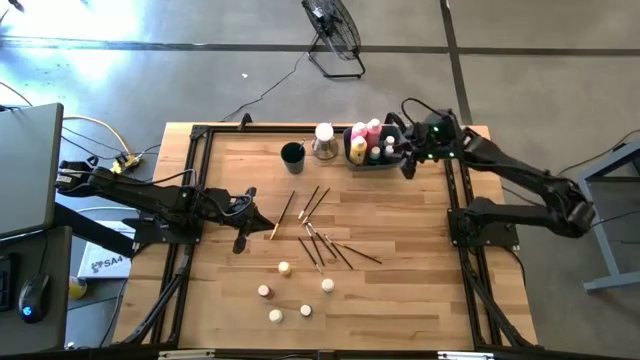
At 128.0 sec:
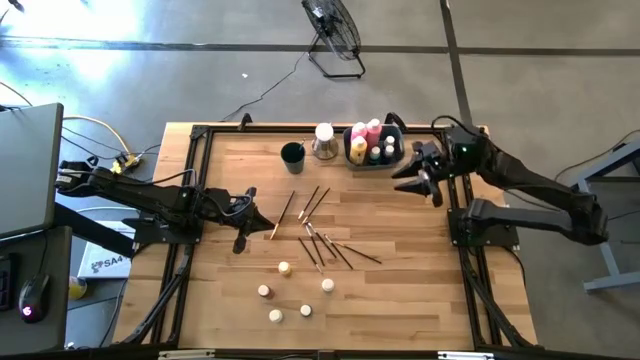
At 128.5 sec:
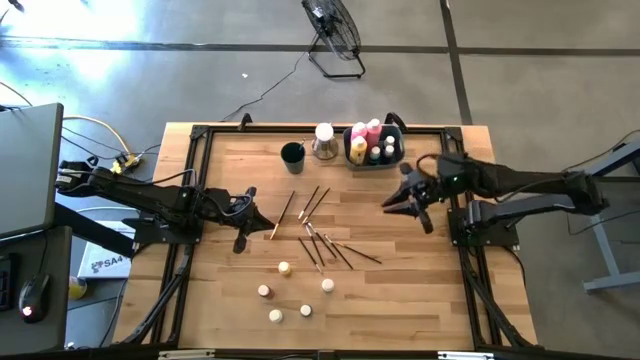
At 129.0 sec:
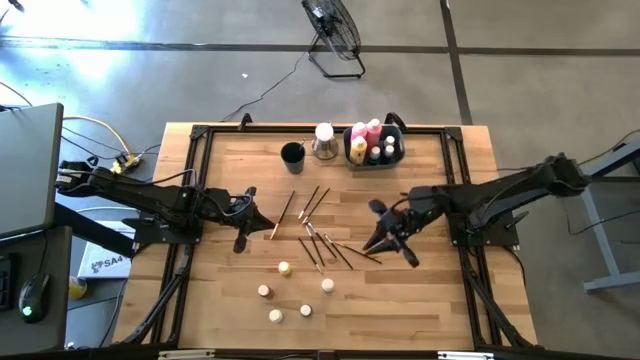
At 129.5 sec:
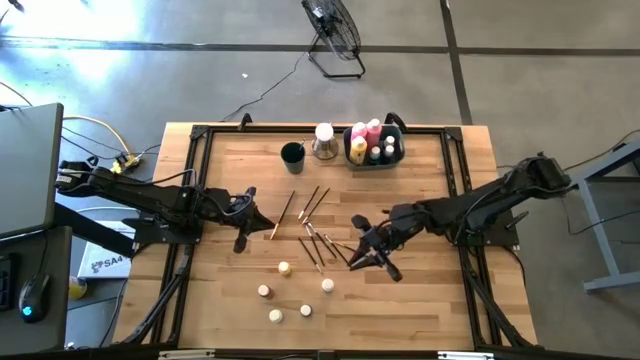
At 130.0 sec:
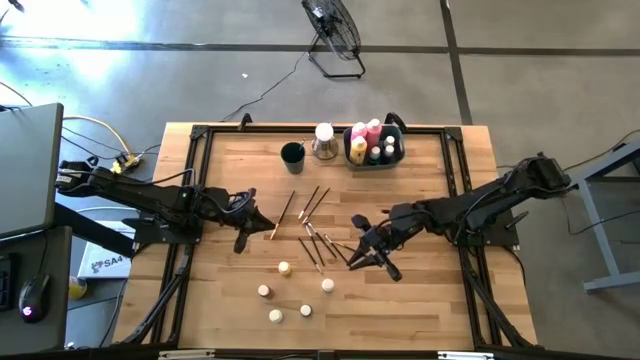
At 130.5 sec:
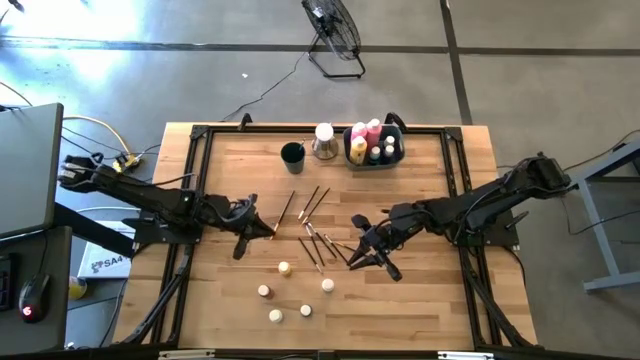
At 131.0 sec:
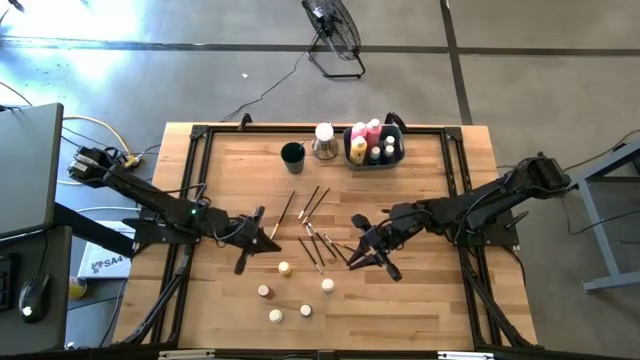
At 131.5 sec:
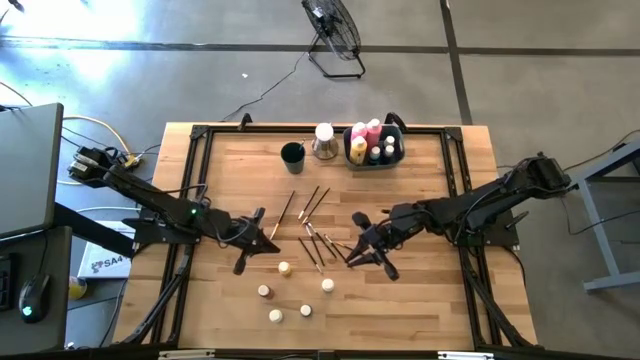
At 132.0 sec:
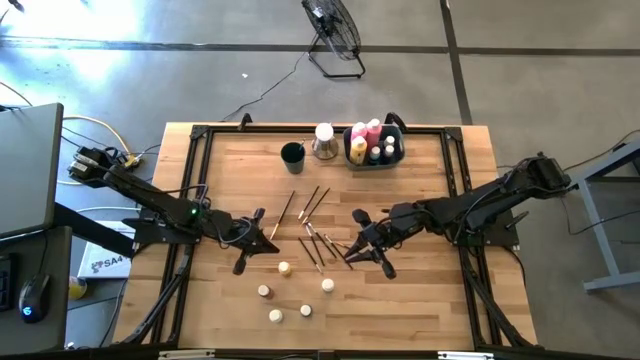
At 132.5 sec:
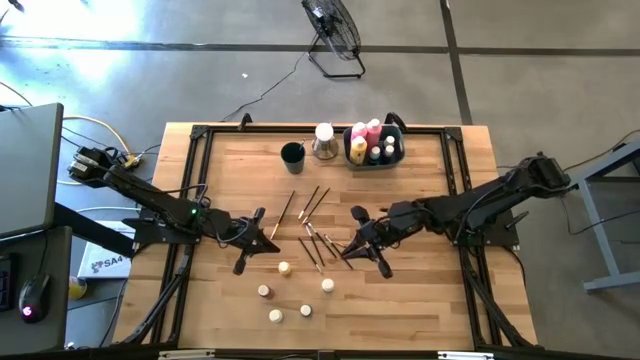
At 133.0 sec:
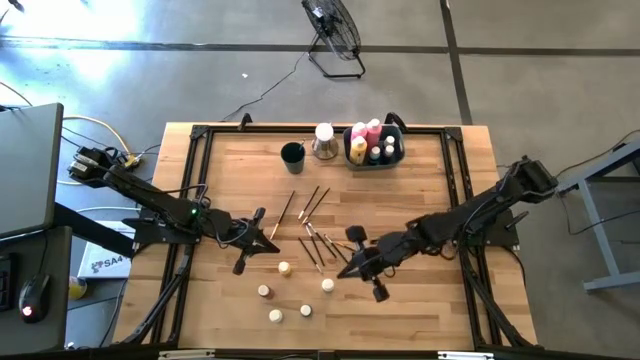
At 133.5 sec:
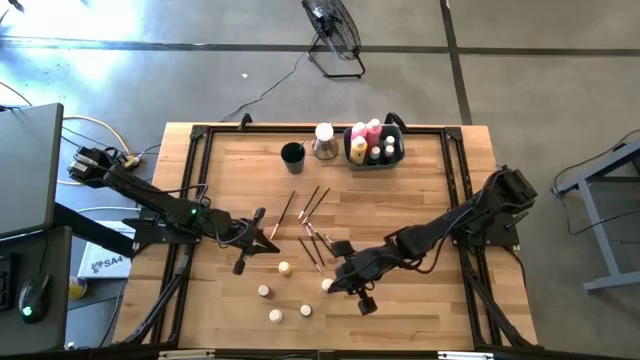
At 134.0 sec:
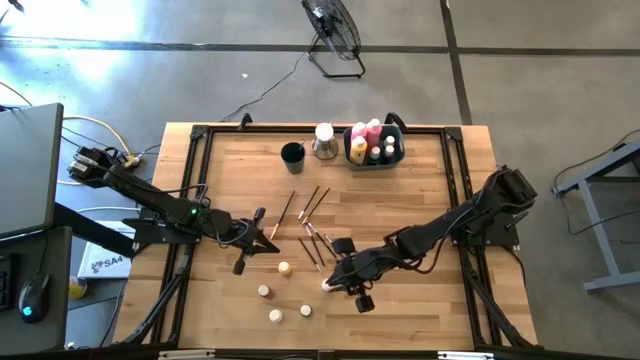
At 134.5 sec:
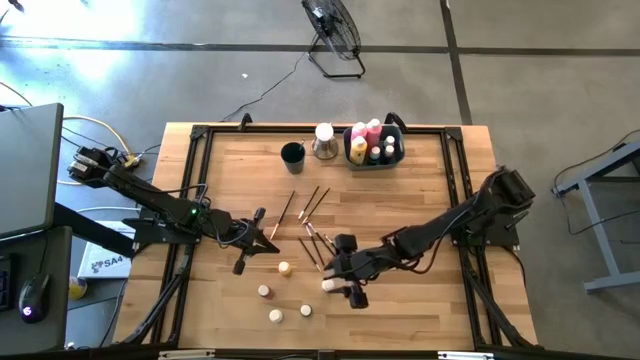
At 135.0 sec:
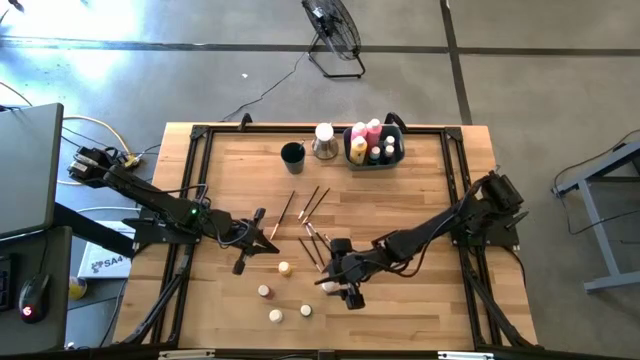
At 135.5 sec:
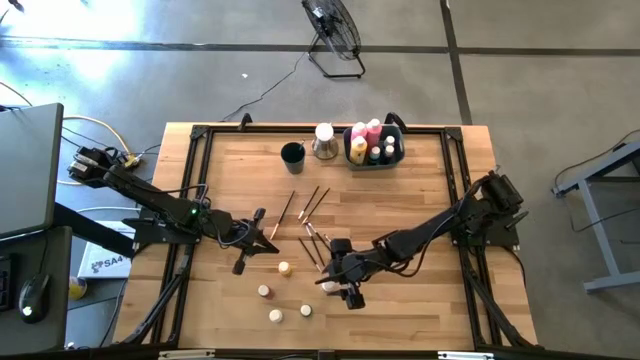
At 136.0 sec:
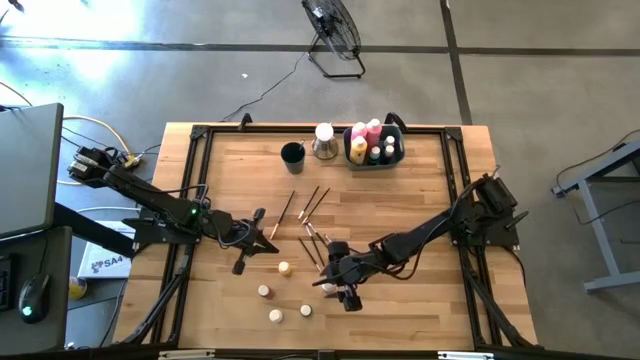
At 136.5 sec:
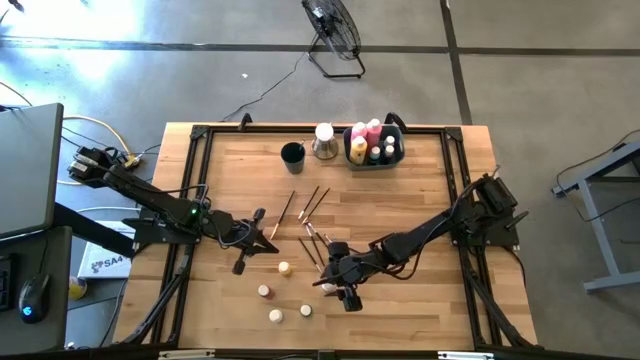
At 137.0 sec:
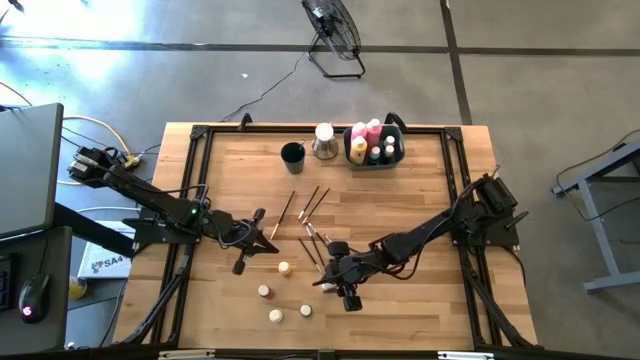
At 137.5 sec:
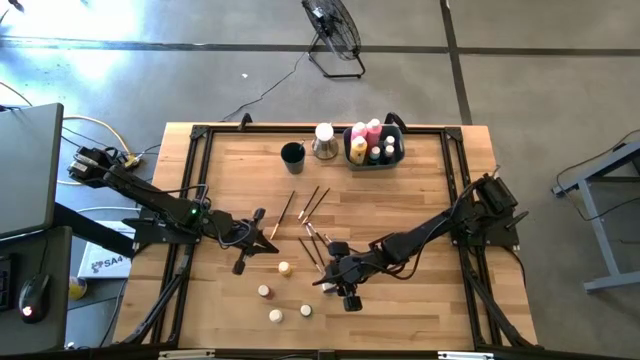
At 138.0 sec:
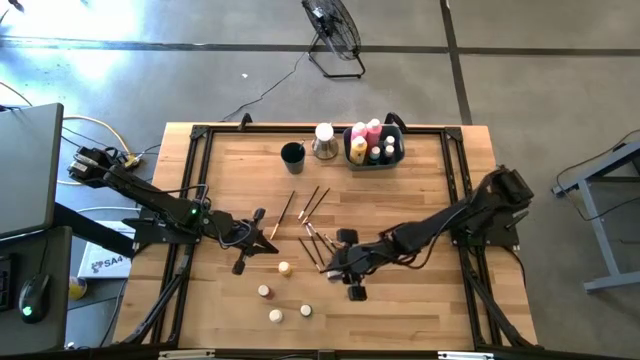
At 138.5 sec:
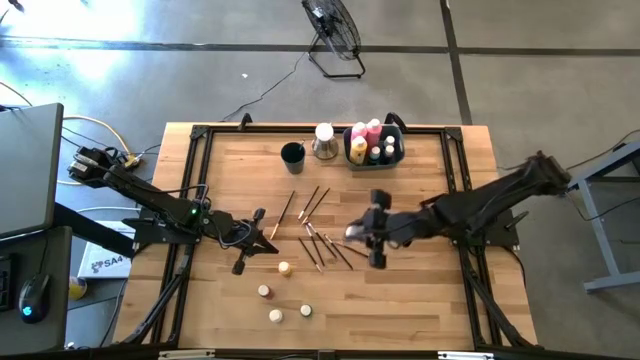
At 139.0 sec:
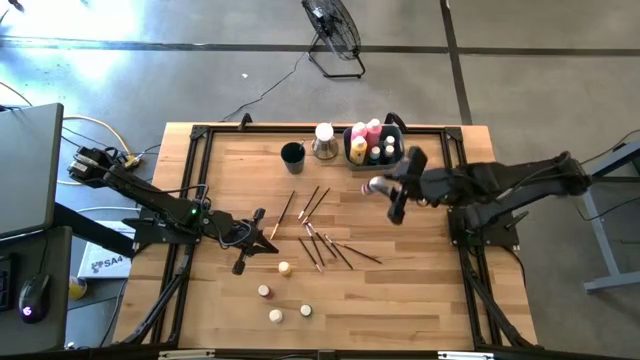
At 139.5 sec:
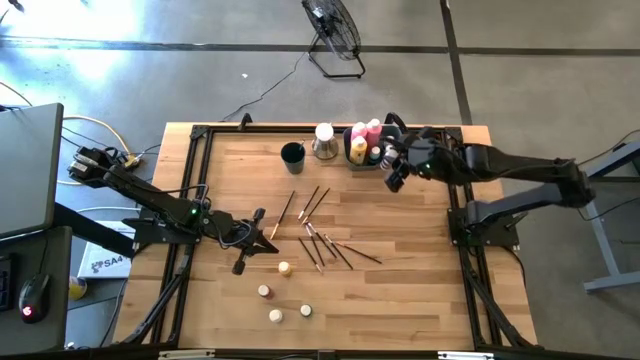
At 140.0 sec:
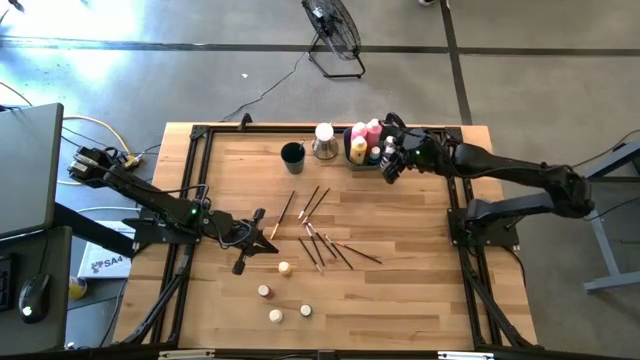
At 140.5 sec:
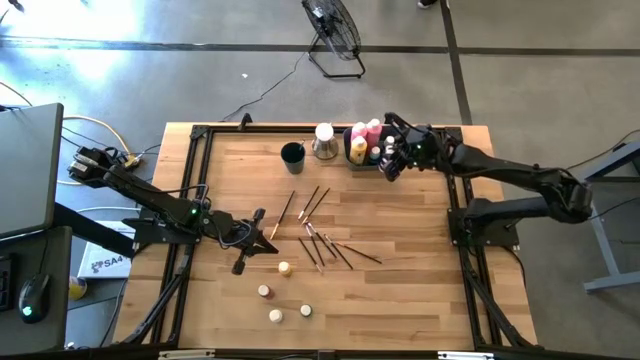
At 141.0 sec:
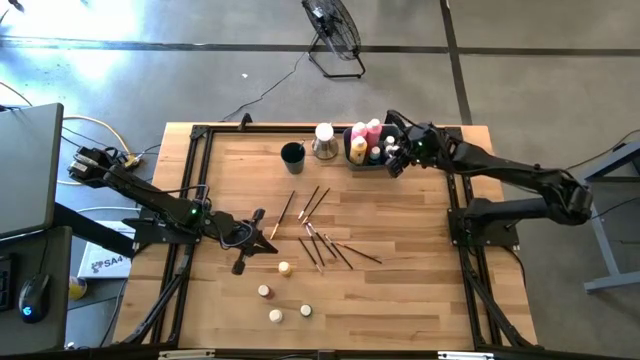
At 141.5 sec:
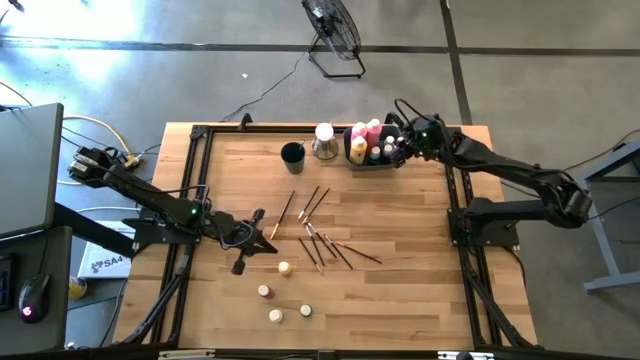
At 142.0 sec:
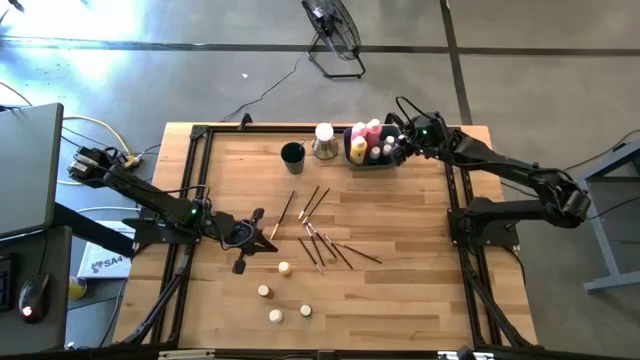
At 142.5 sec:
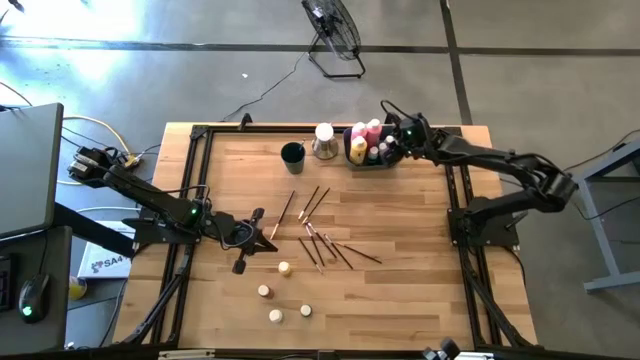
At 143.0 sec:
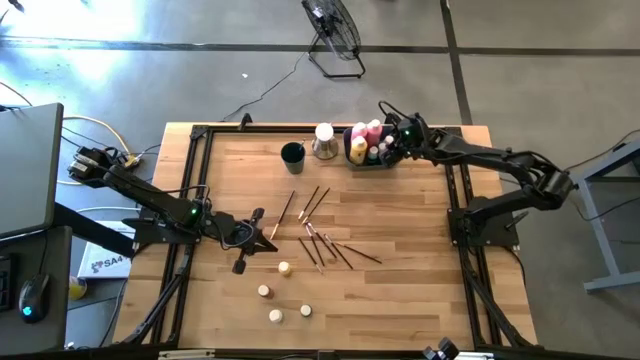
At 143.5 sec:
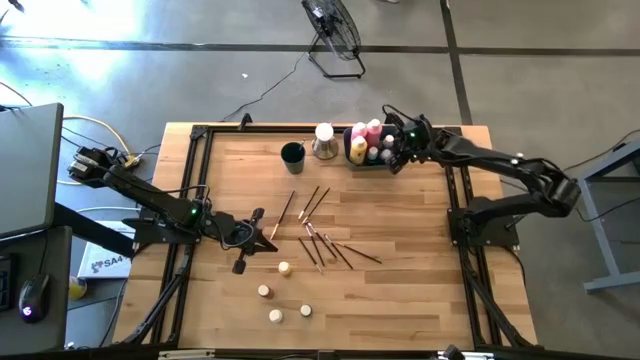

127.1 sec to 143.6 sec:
Task: Pick & Place Paint Supplies
Put the small white paint bottle into the blue bin

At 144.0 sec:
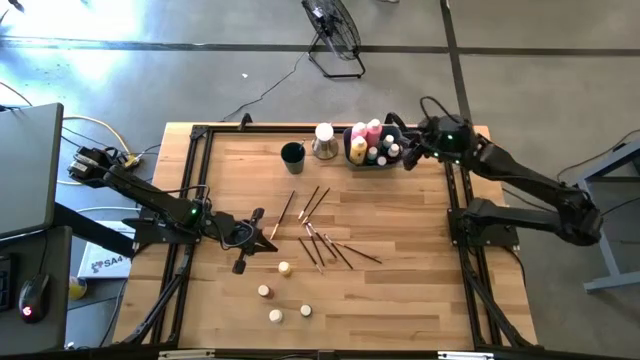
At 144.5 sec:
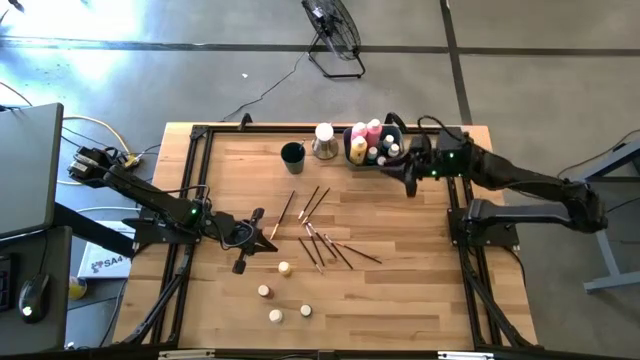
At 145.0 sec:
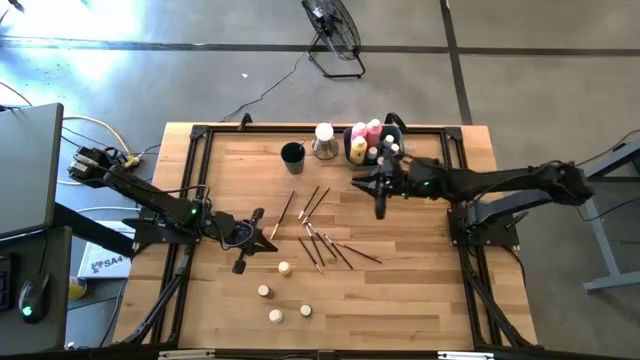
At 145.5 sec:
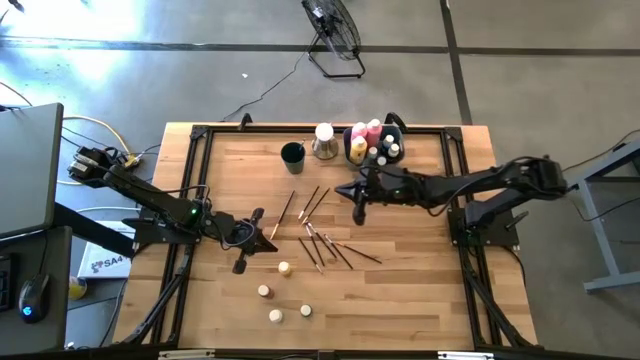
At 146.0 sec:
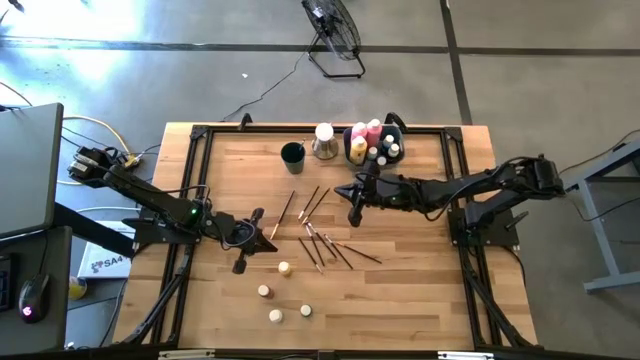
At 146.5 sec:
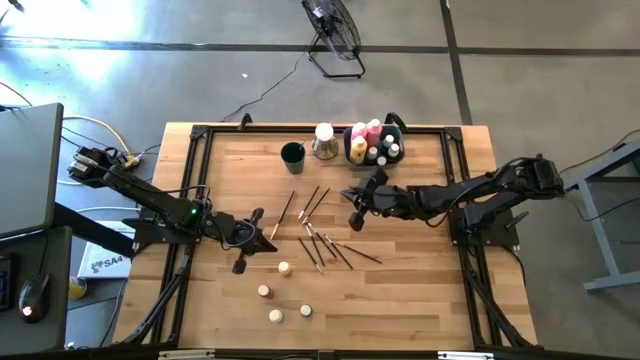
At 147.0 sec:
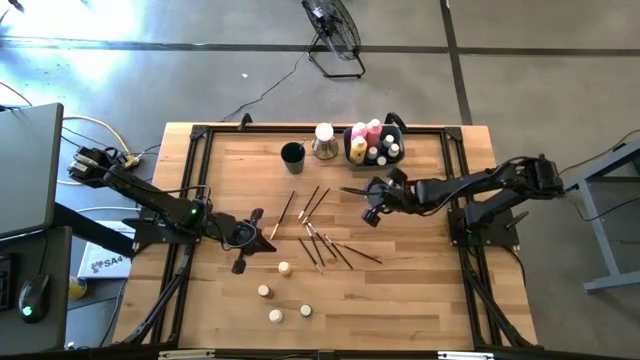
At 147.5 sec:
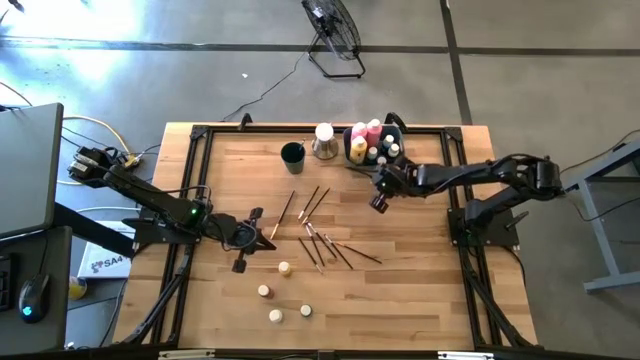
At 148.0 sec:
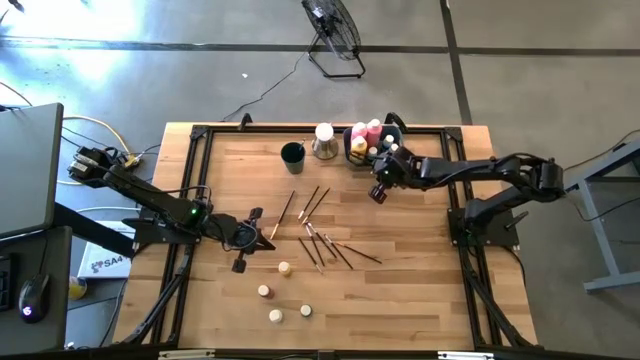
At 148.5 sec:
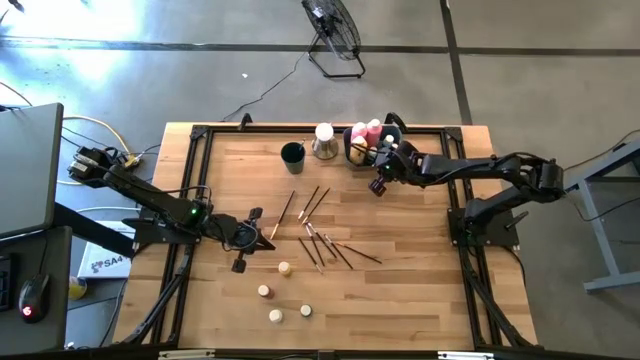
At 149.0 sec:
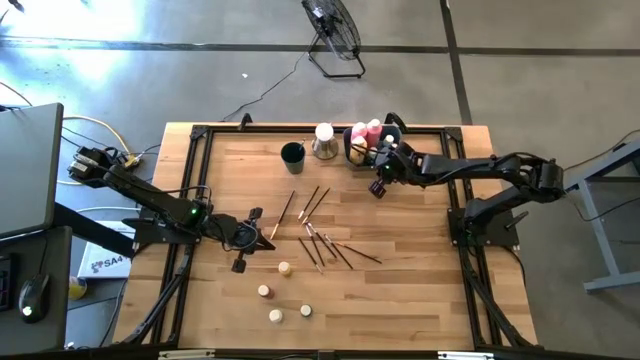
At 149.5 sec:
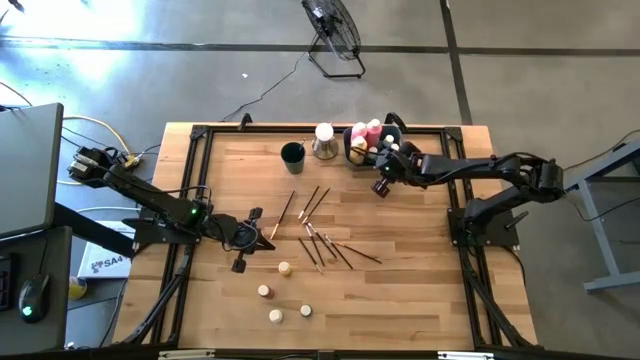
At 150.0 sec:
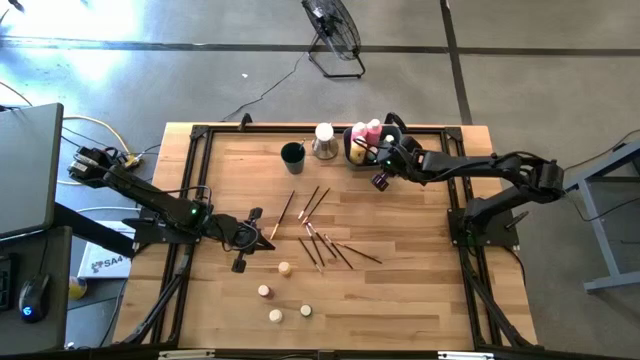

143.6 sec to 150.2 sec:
Adjust the small blue paint bottle into the blue bin
